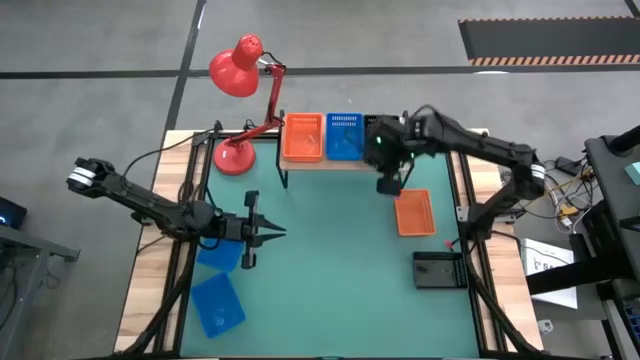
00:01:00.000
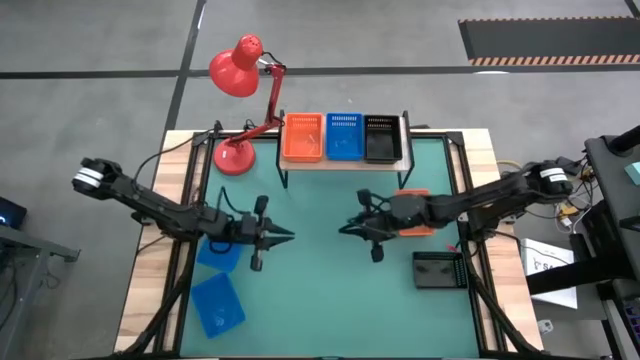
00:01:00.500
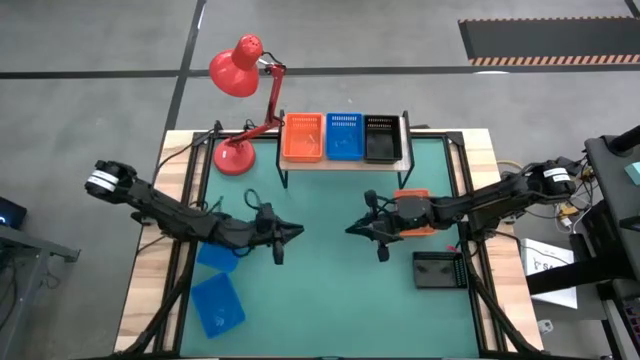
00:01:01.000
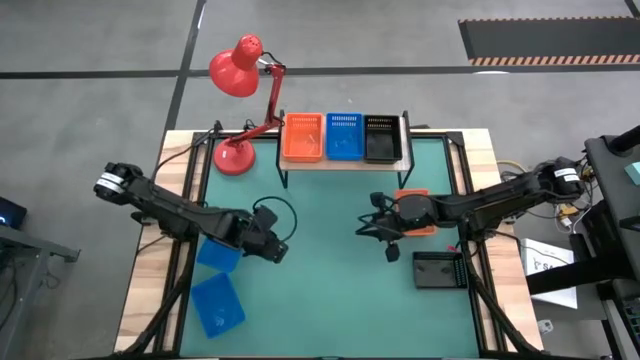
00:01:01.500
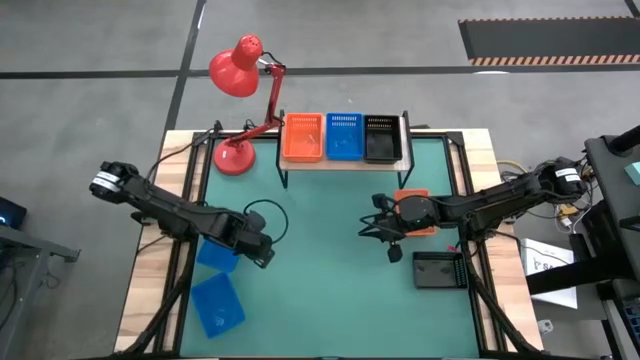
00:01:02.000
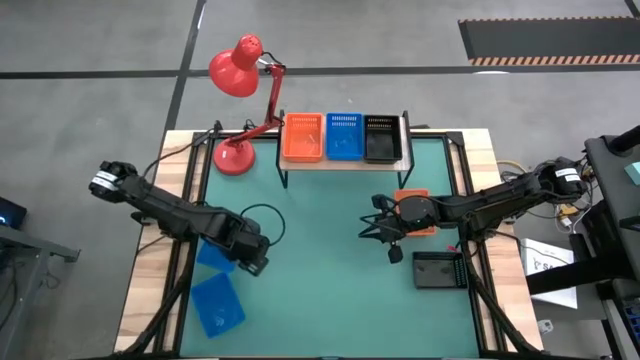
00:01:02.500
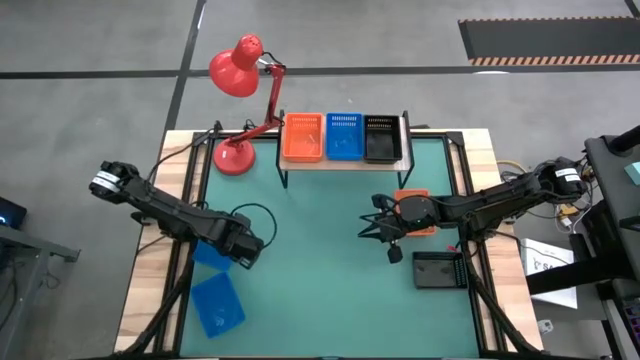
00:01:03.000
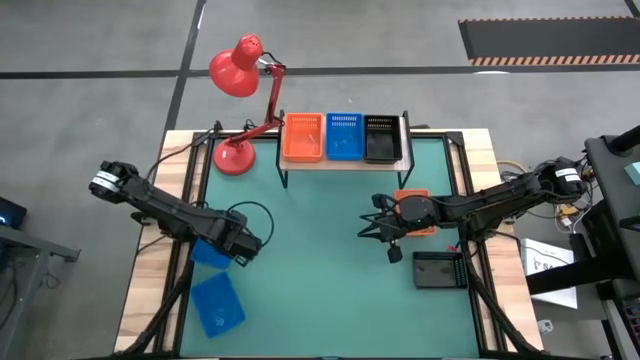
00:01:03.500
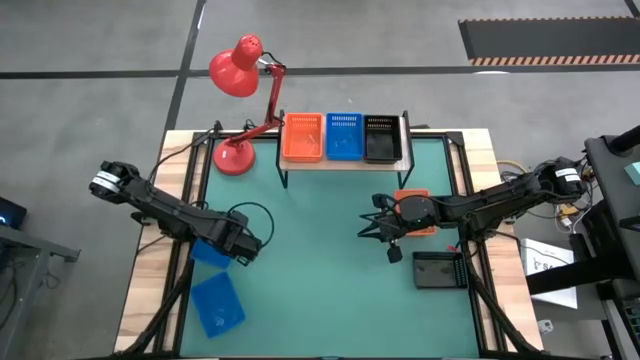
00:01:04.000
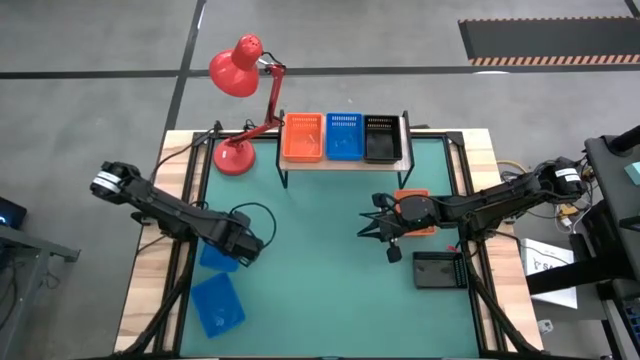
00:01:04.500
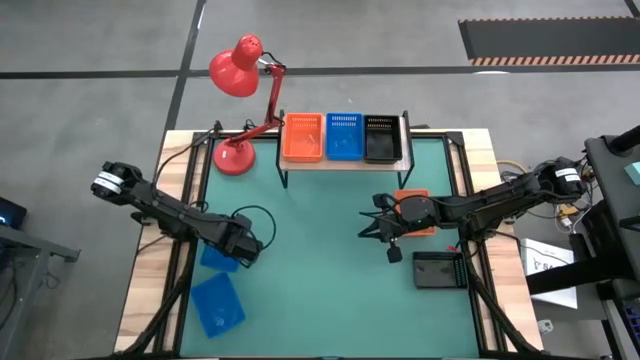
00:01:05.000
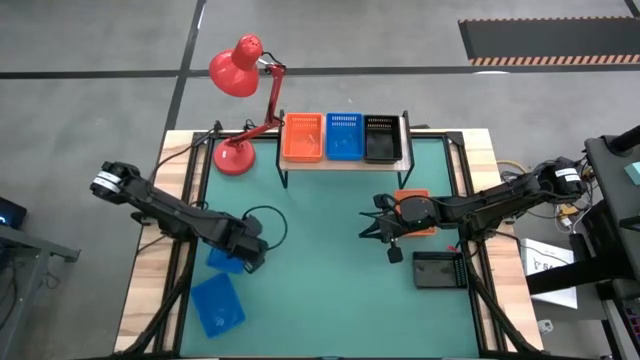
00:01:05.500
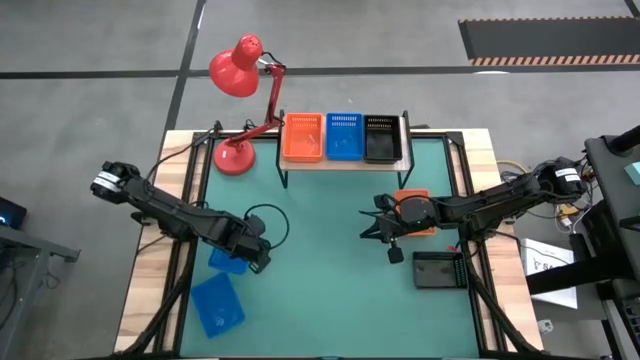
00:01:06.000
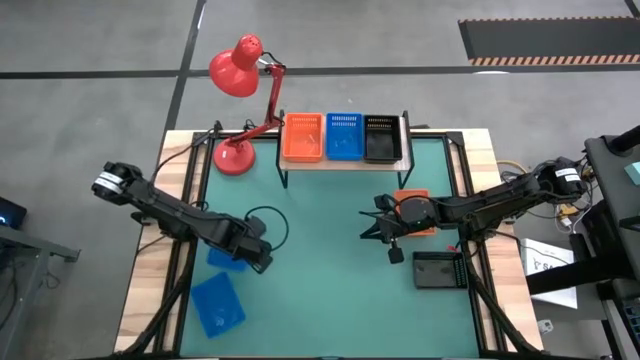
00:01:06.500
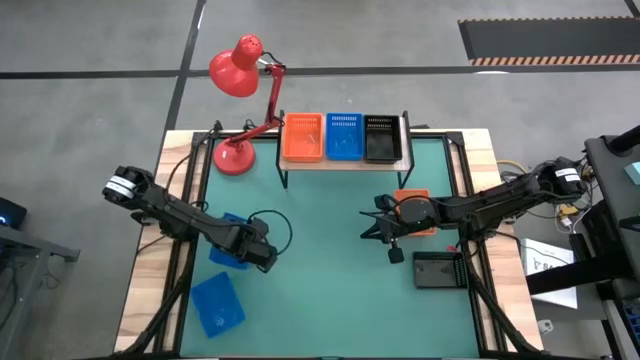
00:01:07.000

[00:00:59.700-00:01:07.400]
Task: Stack baskets on shelf by color
Stack the top blue bin on the other blue bin on the shelf

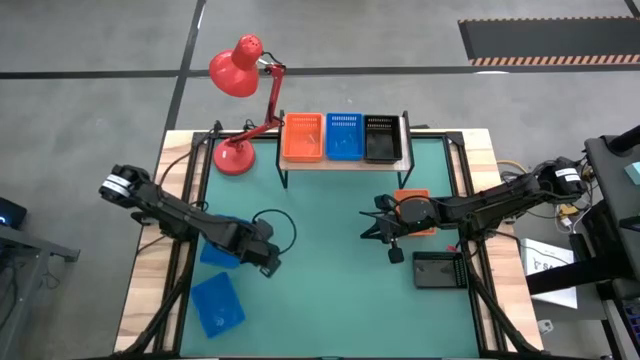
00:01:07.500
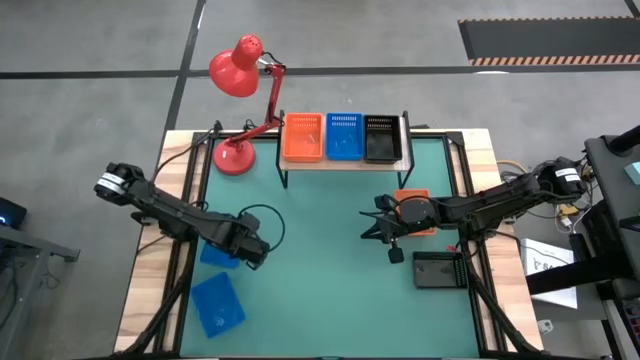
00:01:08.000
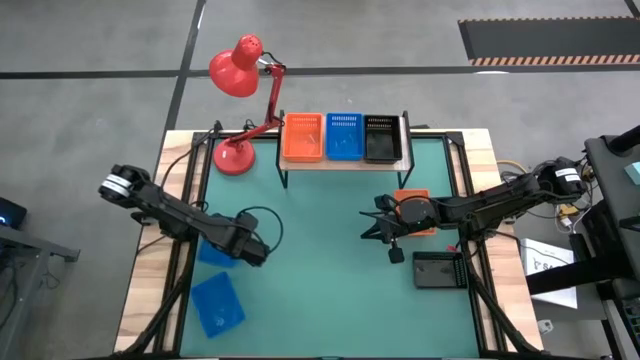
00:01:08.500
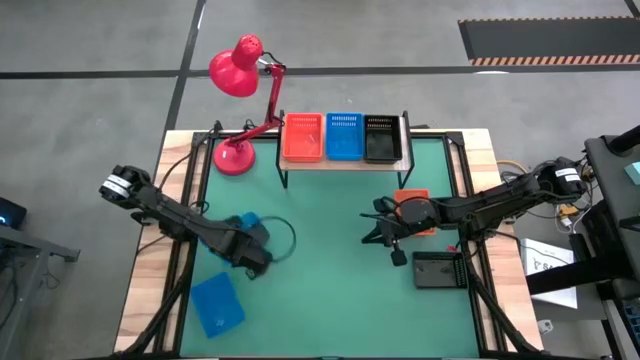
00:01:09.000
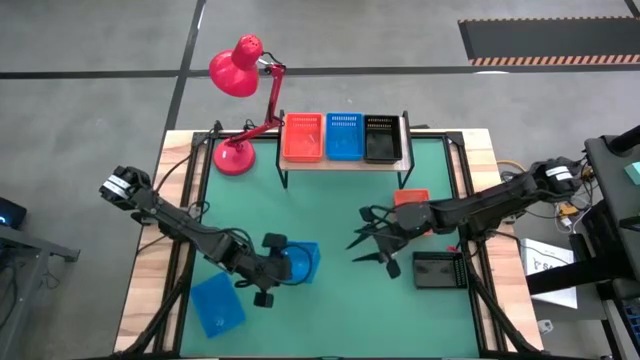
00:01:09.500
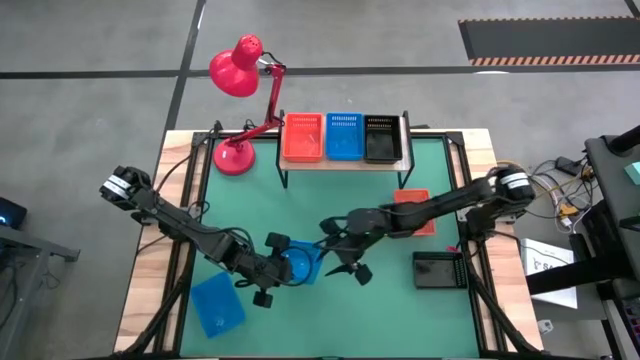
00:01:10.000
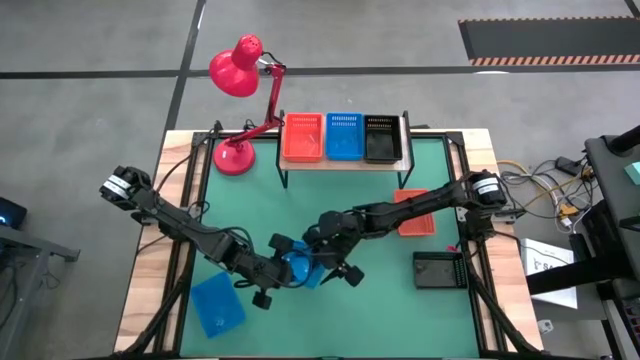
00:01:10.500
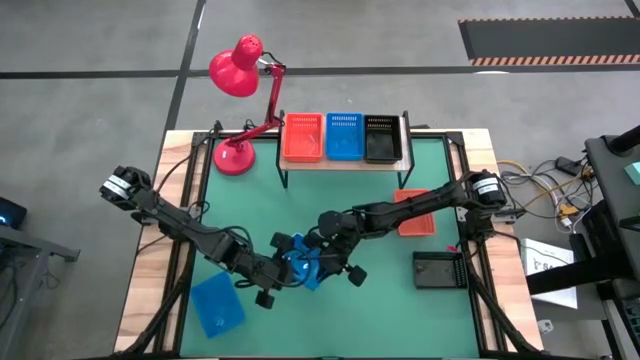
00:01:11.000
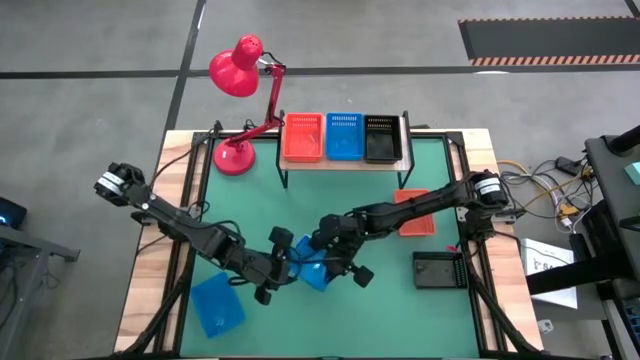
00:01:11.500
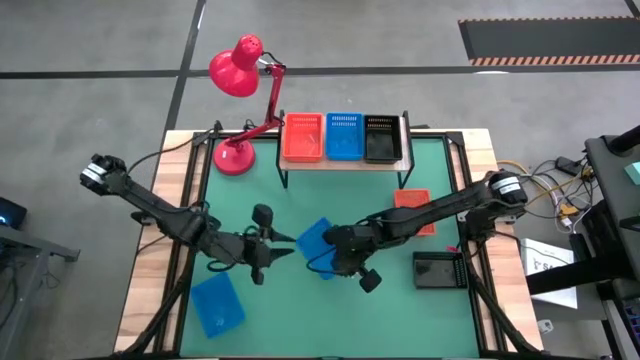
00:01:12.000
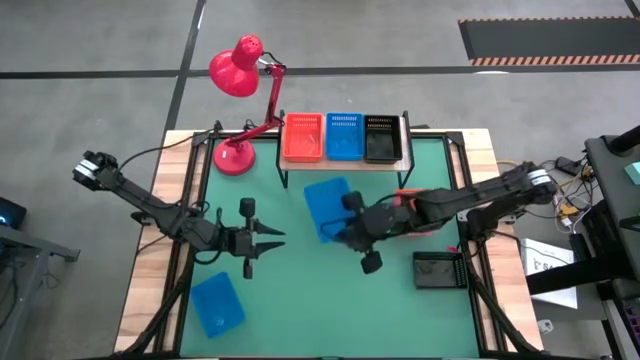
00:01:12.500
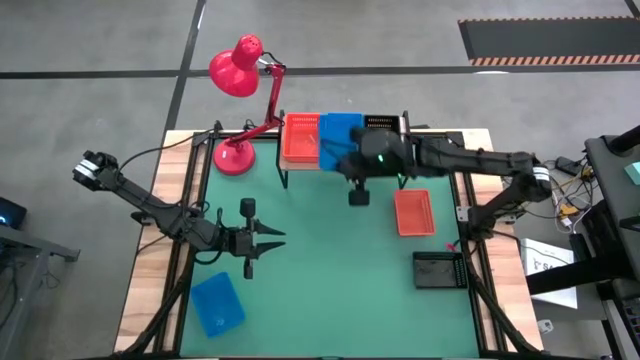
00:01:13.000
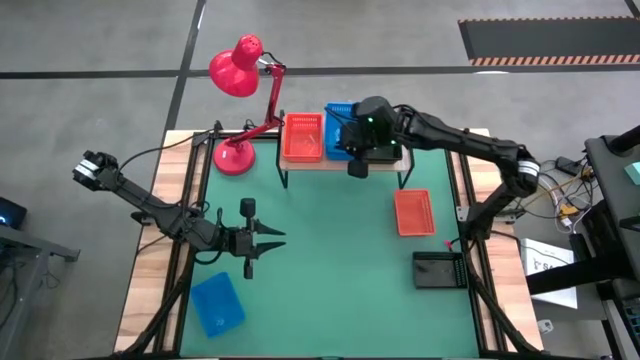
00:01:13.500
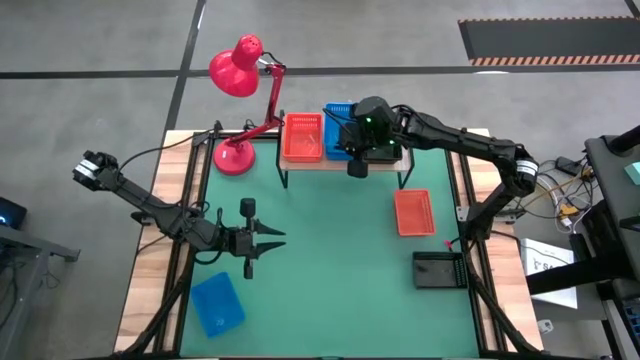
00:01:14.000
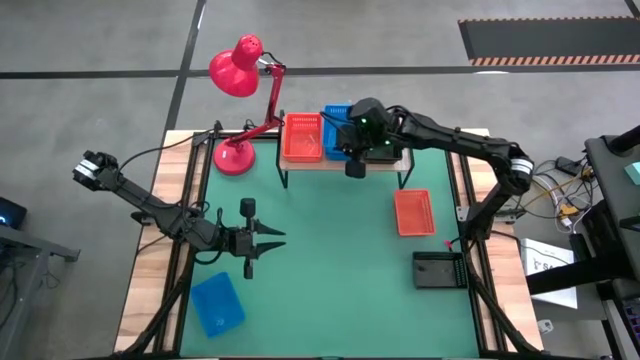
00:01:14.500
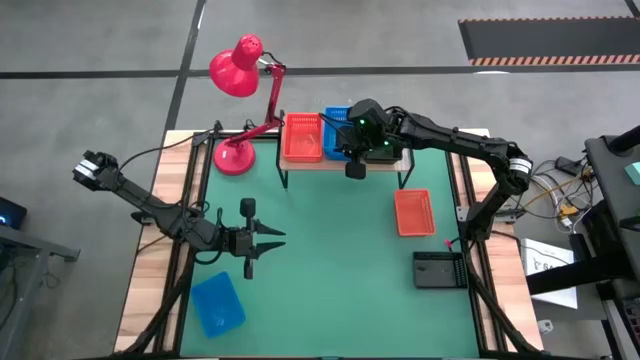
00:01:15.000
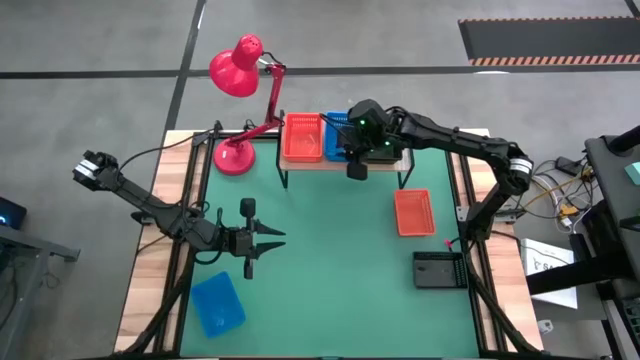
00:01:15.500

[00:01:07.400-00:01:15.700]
Stack the top blue bin on the other blue bin on the shelf

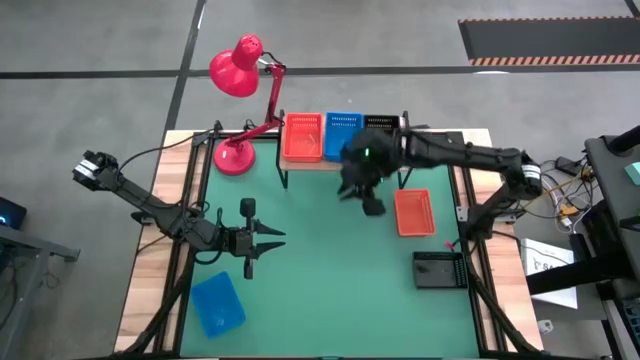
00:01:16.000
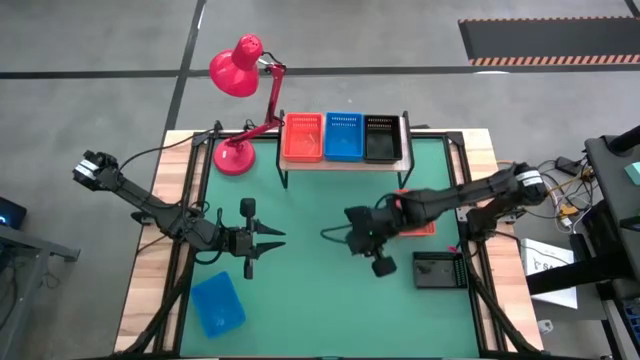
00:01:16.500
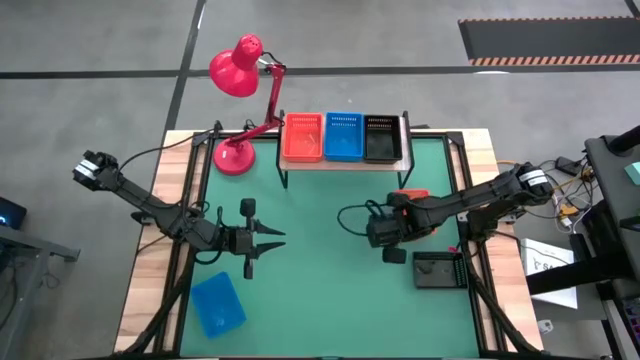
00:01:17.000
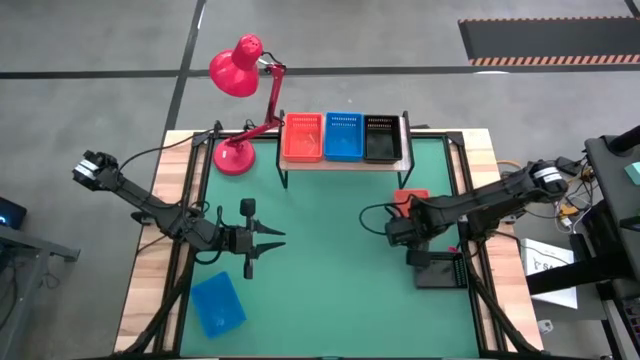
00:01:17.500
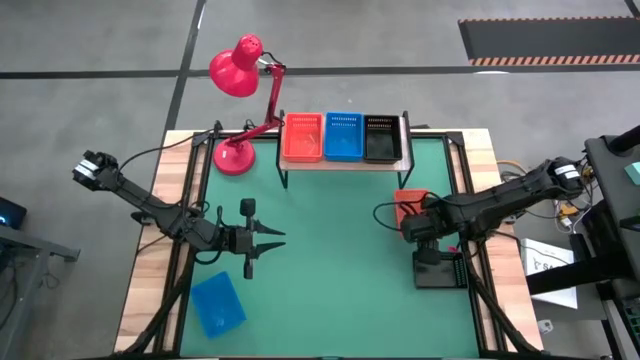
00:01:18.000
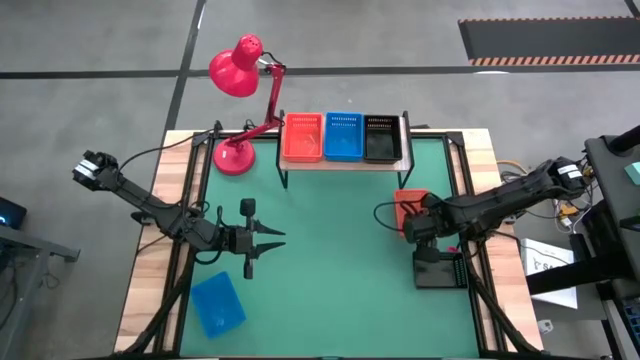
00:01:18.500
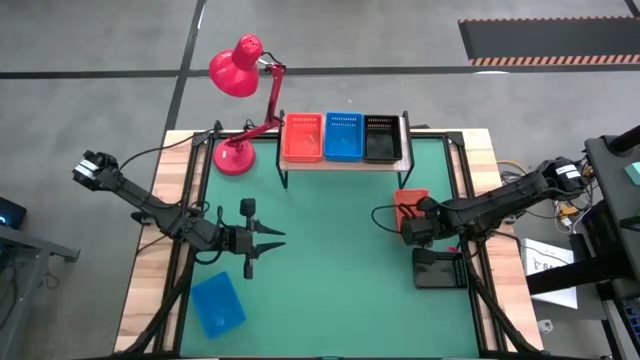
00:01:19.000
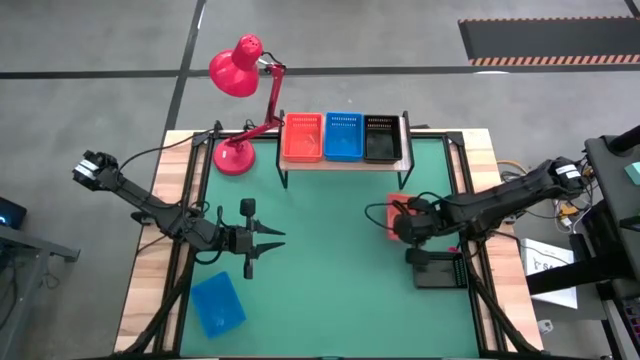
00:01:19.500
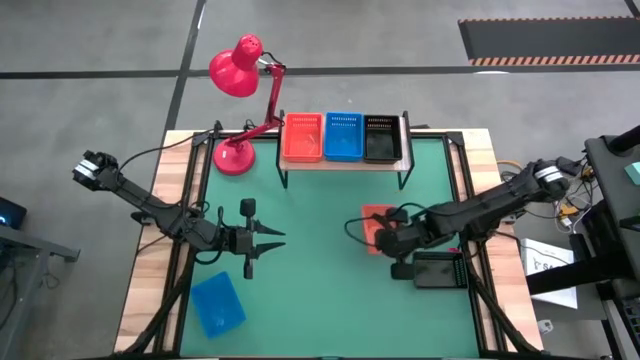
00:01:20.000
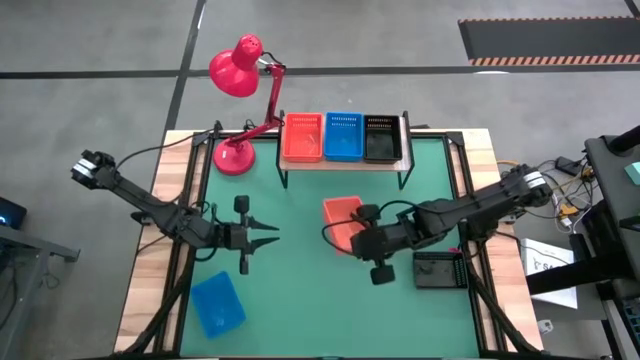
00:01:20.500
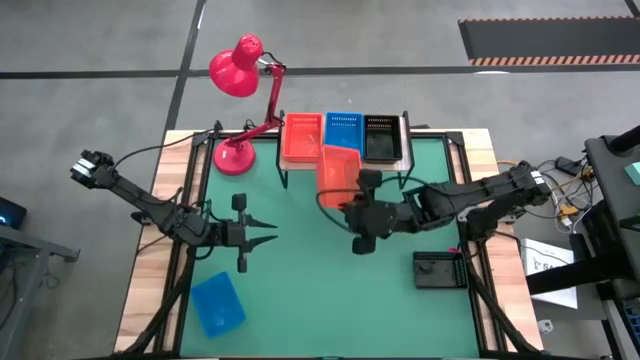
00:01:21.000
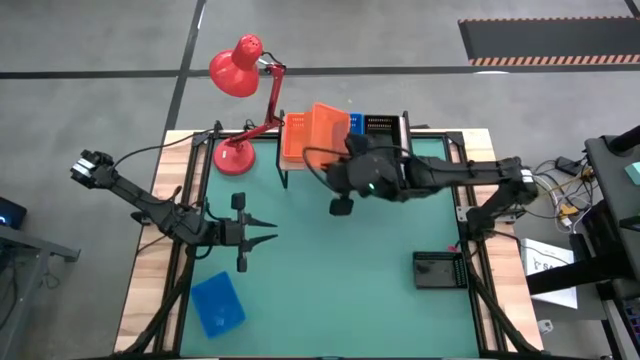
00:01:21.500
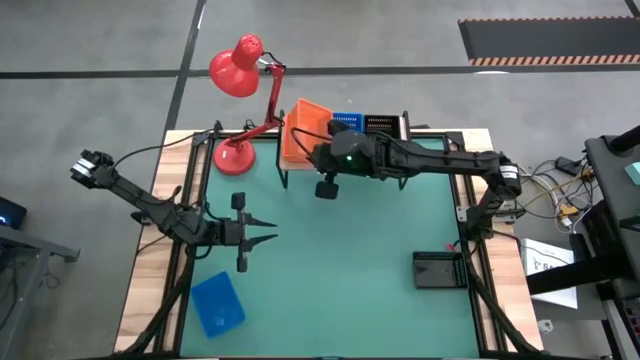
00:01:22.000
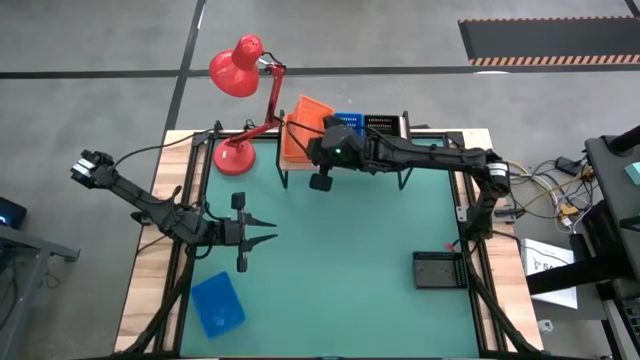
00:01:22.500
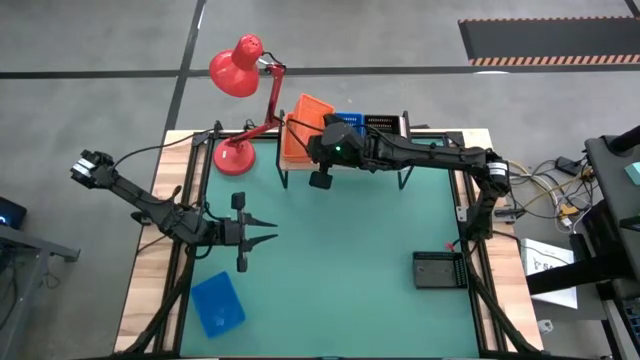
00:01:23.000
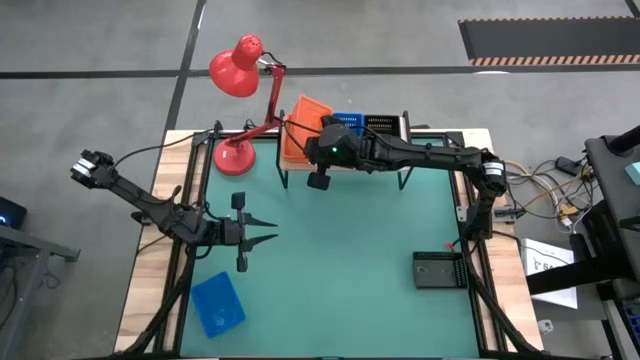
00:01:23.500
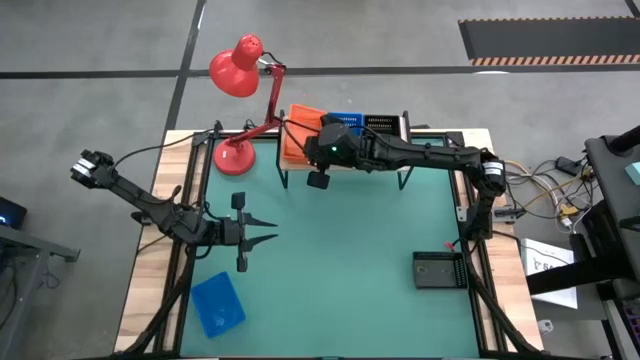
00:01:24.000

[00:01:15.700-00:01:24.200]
Stack the orange bin on the other orange bins on the shelf
